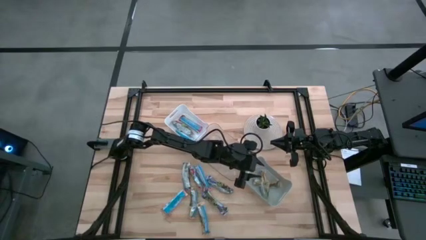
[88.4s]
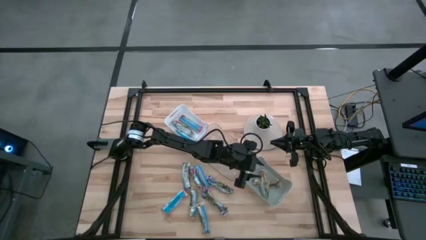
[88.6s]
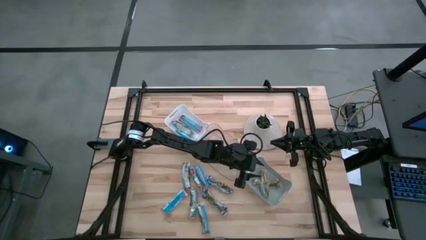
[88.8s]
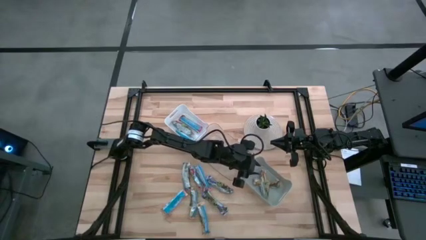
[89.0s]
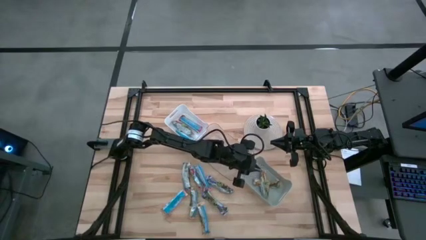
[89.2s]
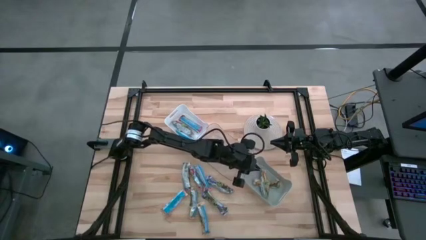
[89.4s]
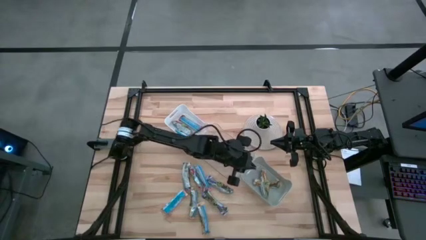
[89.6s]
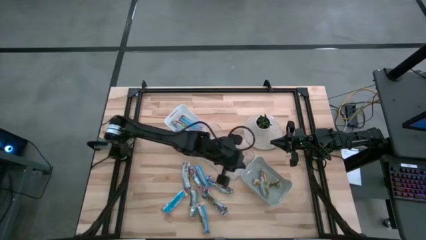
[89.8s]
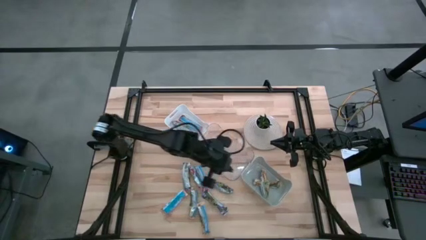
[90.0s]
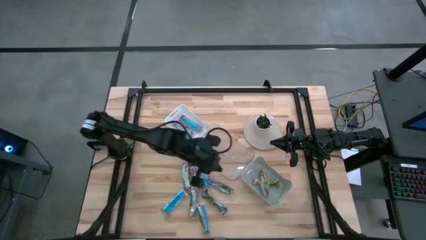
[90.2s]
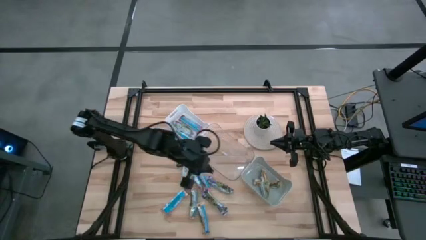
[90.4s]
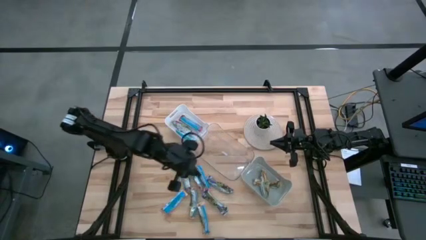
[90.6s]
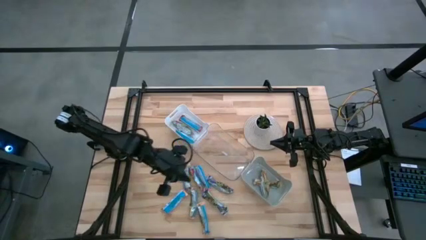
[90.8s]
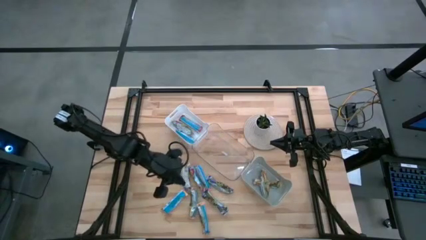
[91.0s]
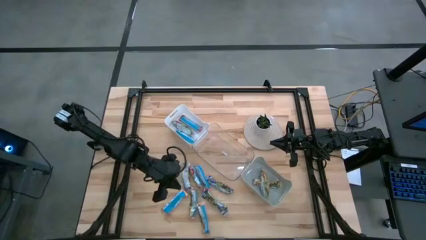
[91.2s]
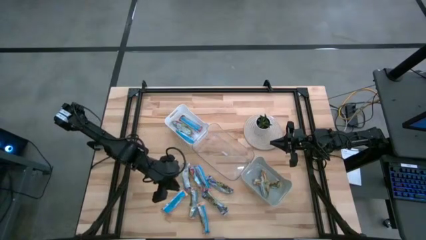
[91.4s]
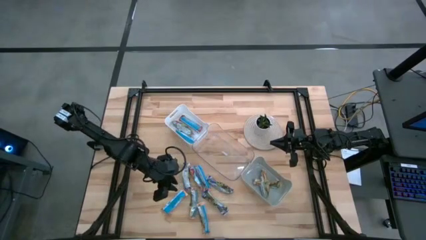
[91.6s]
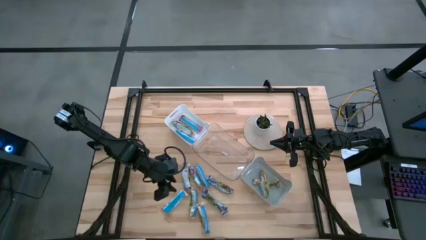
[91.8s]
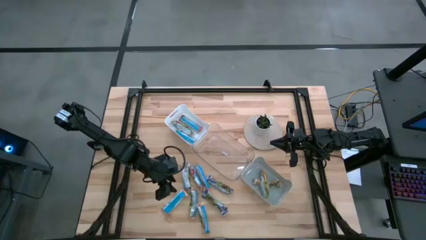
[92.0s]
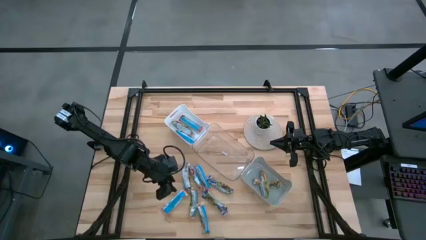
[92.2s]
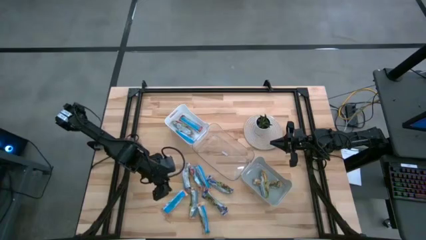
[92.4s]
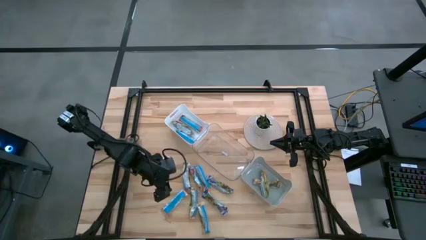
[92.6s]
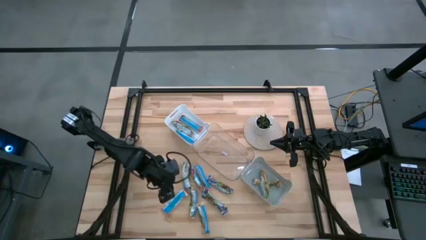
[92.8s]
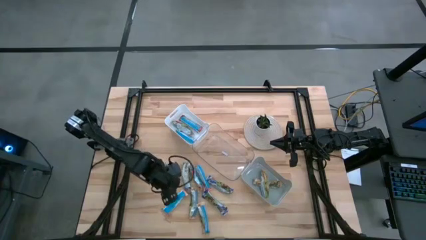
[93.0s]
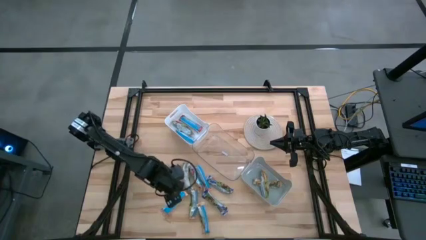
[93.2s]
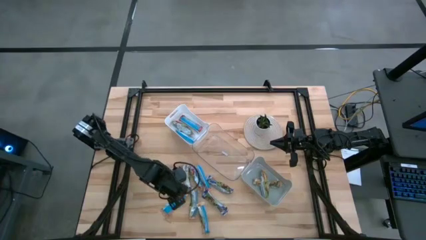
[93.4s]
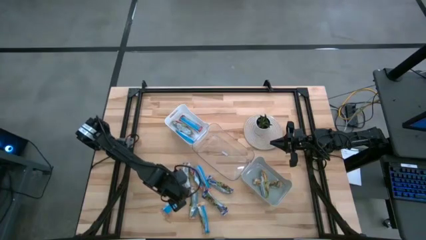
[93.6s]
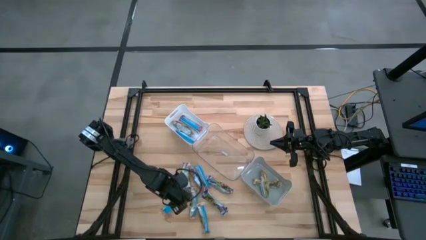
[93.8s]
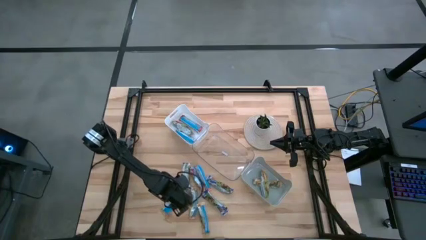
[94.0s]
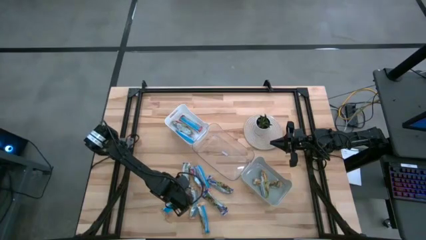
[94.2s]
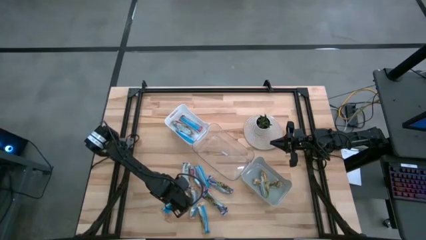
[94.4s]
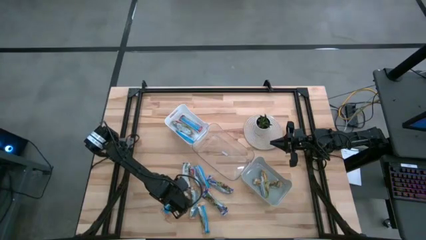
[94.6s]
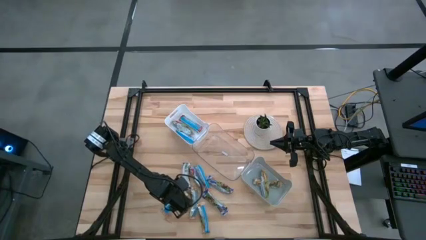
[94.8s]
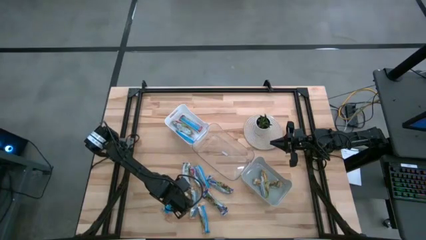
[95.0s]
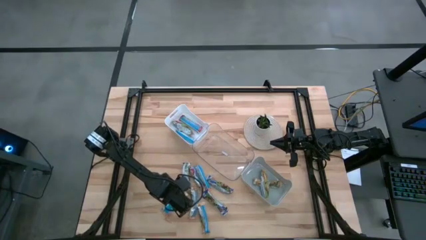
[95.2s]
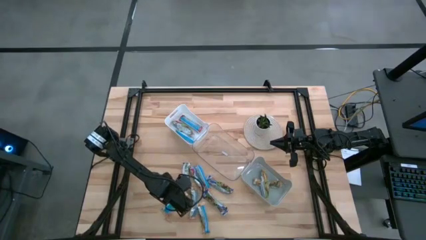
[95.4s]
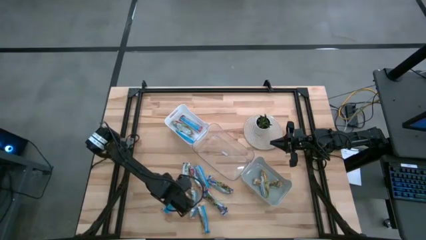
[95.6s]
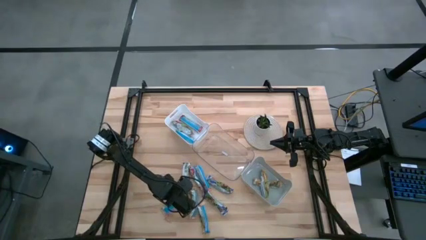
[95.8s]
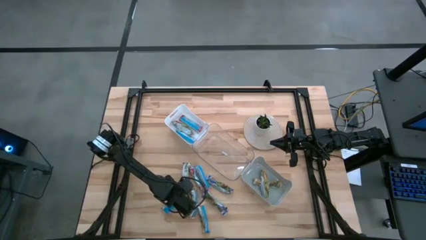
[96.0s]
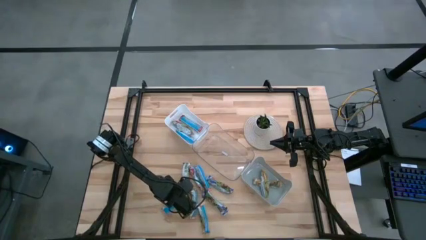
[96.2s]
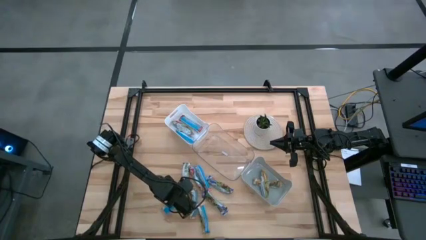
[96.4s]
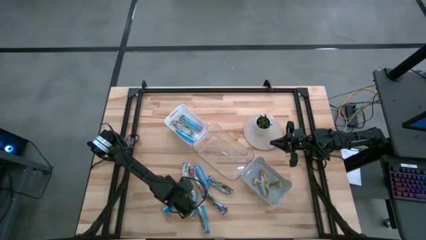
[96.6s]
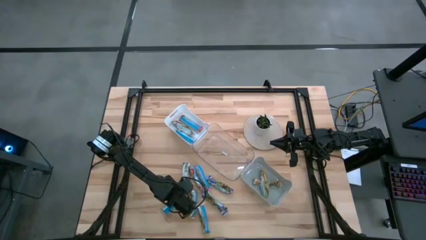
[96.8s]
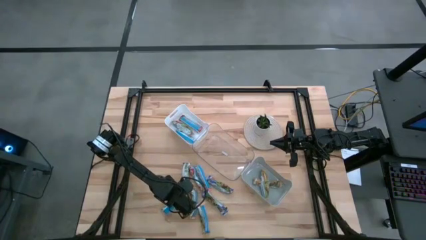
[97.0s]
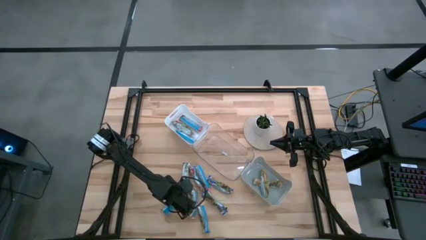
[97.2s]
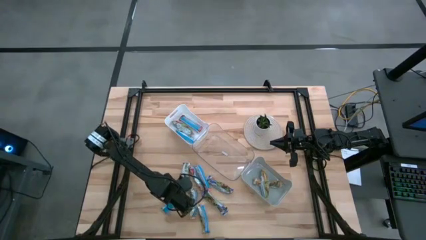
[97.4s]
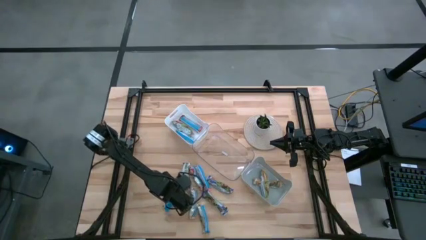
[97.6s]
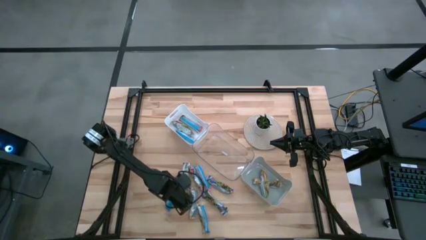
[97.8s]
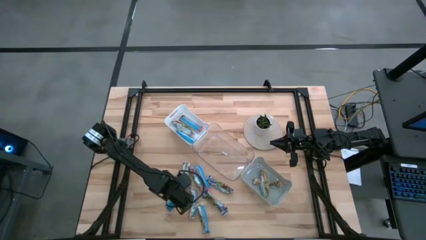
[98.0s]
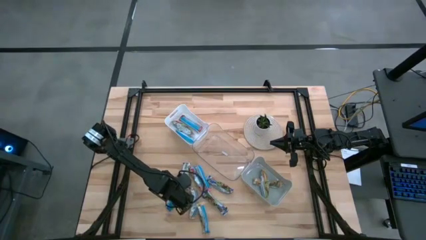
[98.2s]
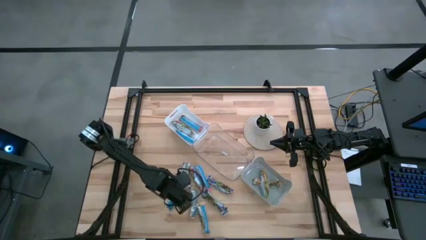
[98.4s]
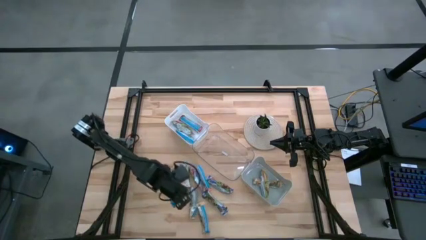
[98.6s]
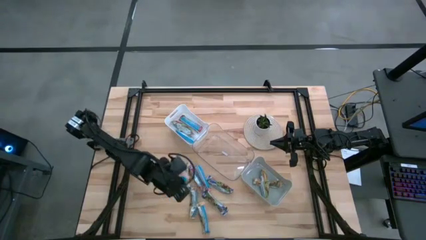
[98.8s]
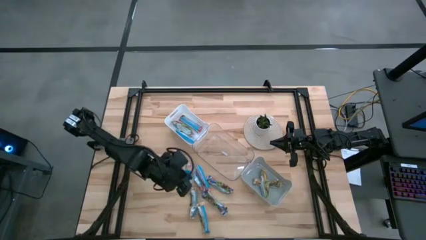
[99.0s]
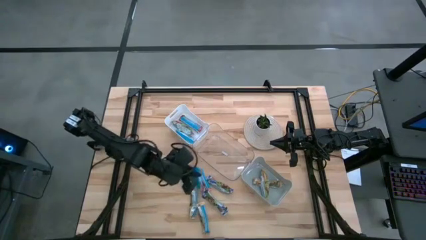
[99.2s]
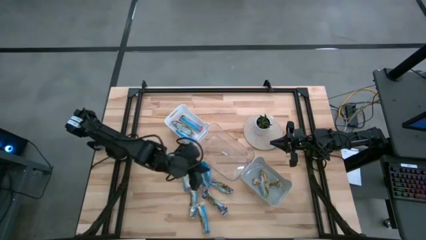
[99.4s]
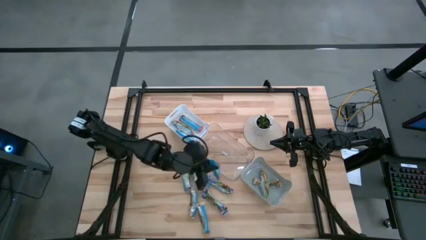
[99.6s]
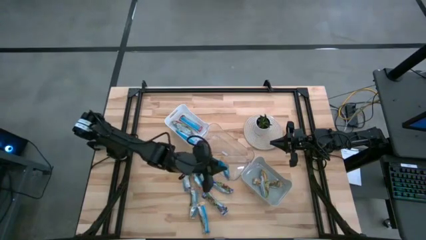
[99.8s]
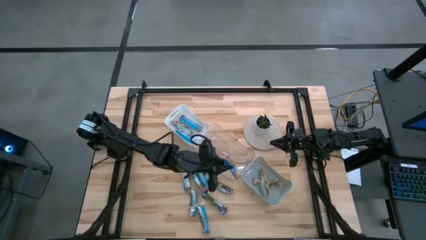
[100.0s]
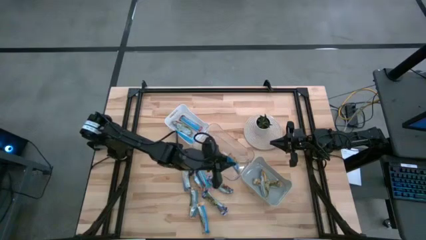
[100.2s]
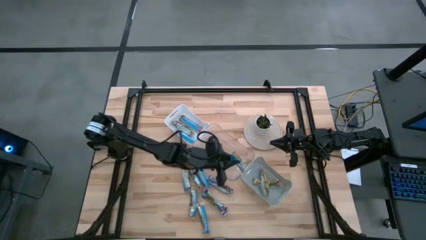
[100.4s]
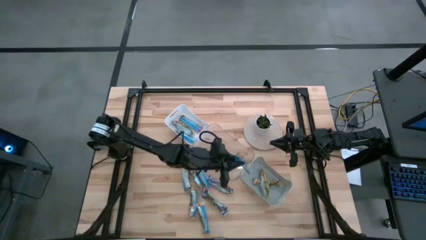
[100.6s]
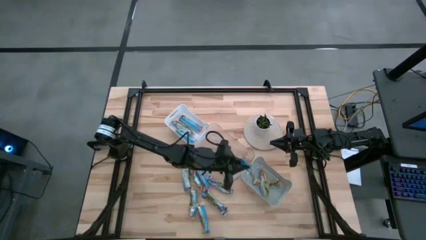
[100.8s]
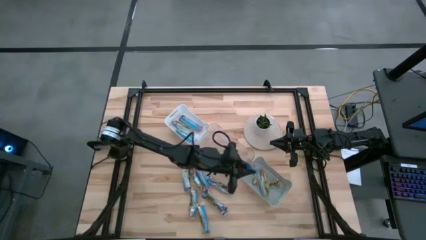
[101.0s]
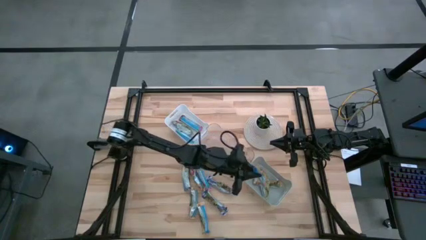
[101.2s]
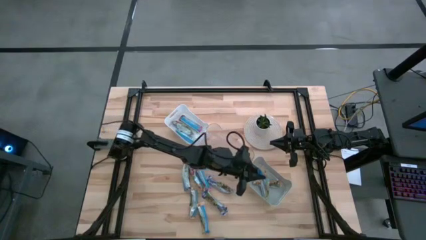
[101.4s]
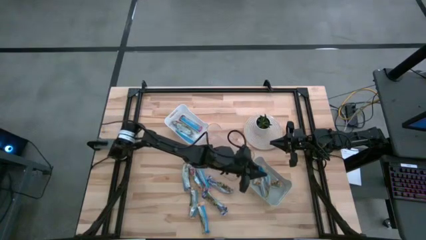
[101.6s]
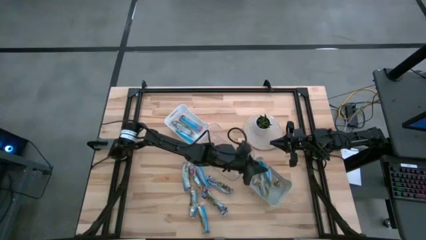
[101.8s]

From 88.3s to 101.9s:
Task: Pick and place Granola Bars by type
Put the orange granola bar into the gray bin

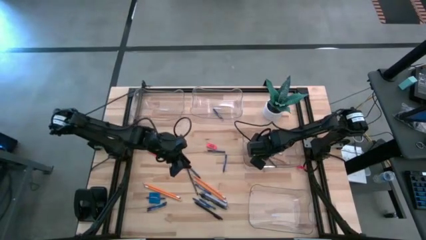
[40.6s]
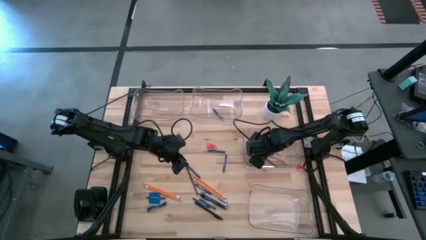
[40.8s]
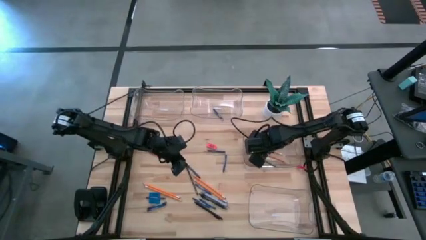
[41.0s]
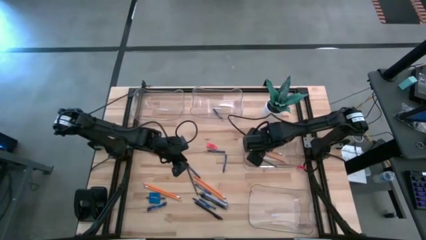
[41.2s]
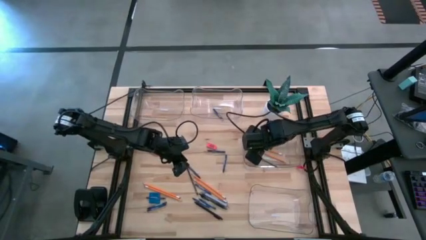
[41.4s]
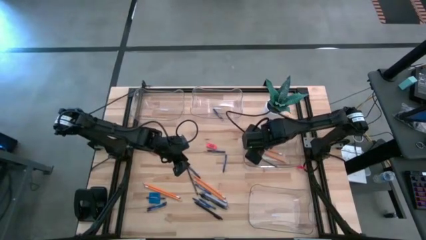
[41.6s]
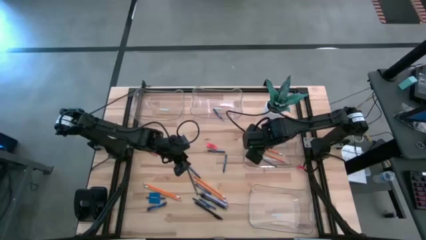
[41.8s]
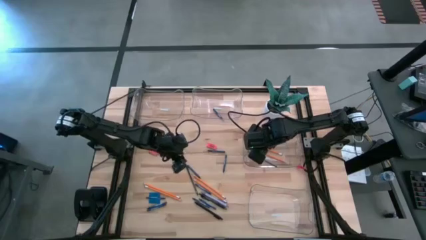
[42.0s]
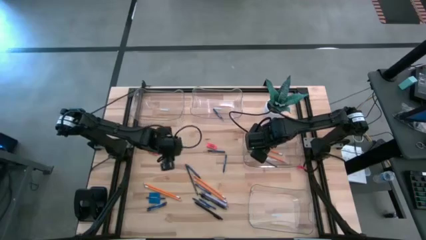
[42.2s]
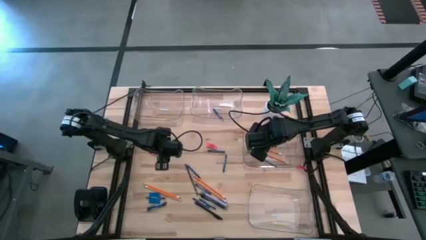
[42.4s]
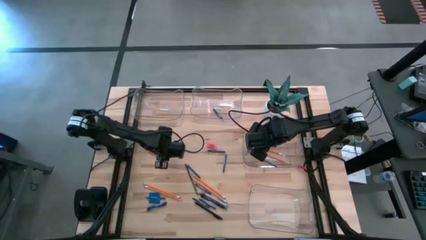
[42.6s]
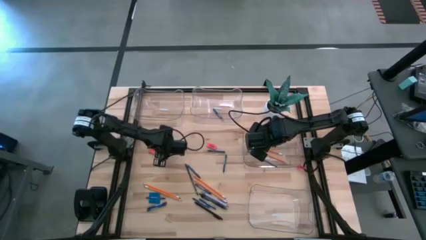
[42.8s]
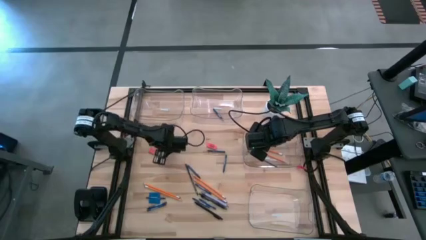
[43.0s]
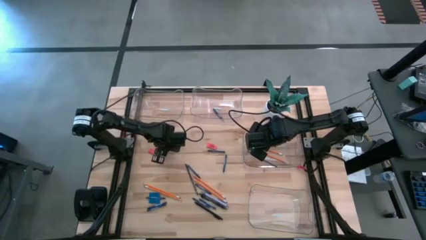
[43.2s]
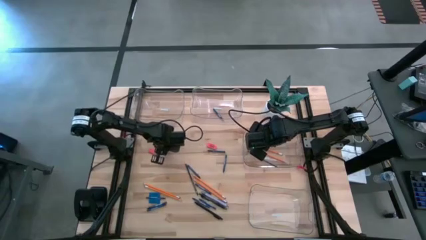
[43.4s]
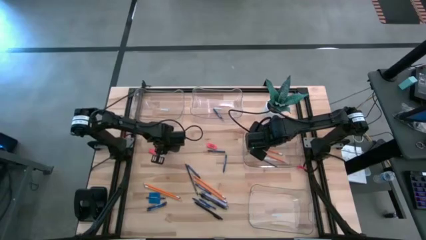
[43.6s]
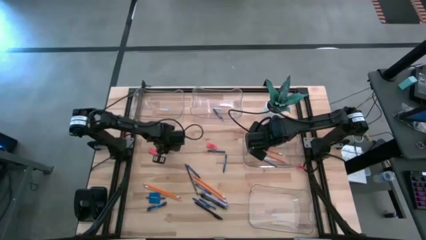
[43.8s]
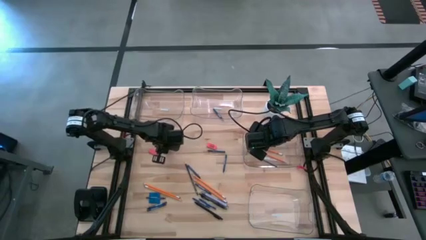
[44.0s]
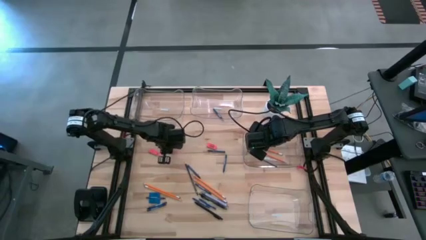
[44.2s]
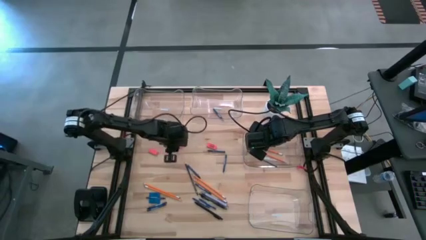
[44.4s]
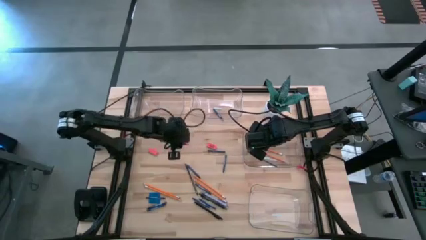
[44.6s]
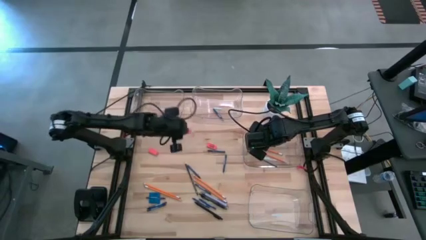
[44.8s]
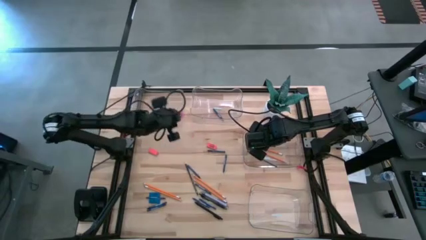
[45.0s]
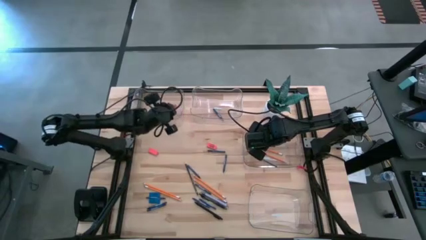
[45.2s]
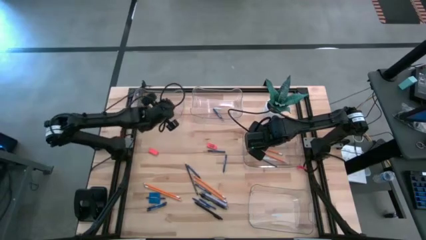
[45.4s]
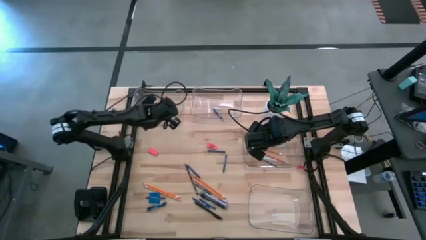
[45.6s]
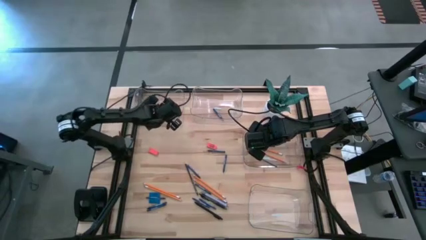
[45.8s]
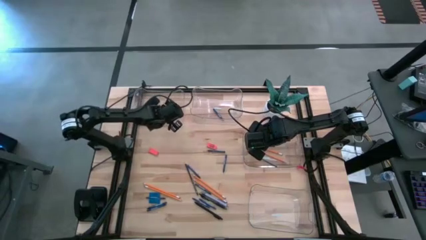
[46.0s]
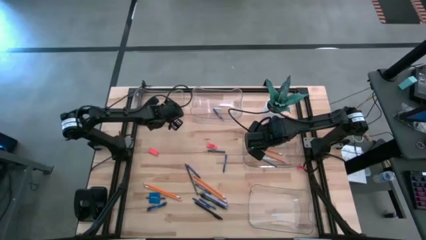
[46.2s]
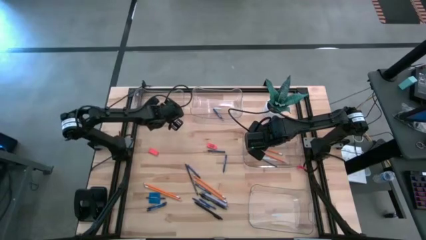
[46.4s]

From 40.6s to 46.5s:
Task: Sort crayons/erasers/pens/pencils in bins
Put the pink eraser into the top left transparent bin
